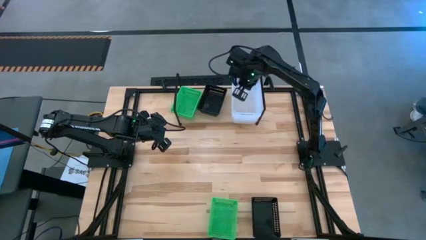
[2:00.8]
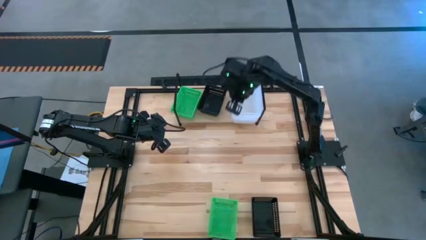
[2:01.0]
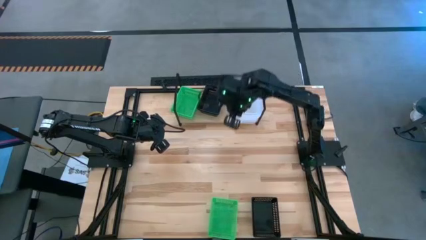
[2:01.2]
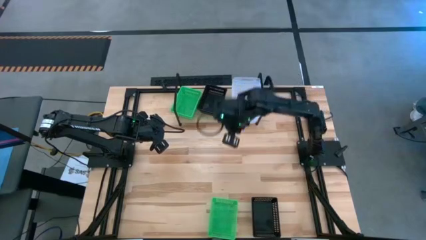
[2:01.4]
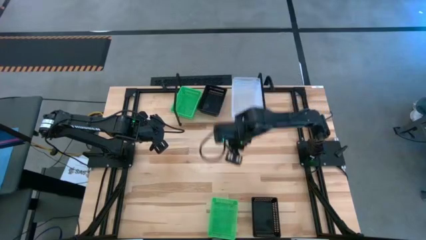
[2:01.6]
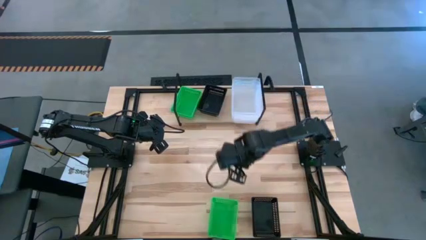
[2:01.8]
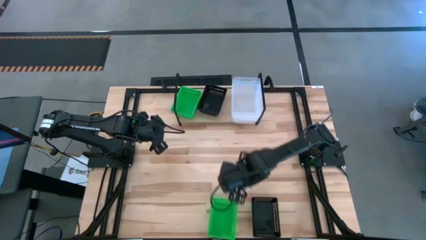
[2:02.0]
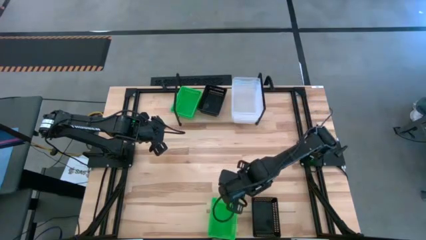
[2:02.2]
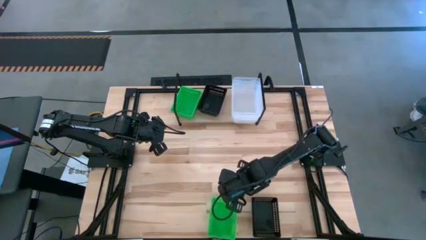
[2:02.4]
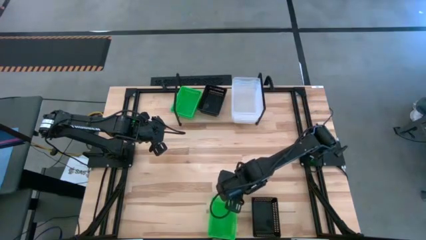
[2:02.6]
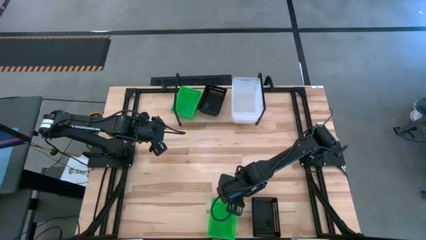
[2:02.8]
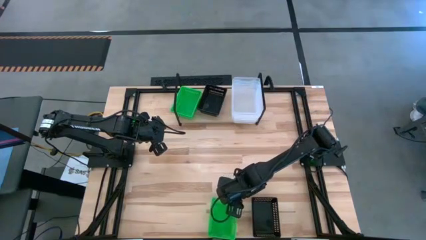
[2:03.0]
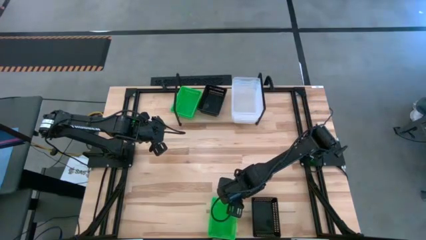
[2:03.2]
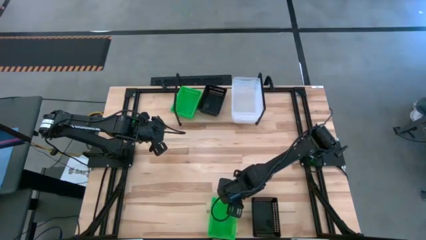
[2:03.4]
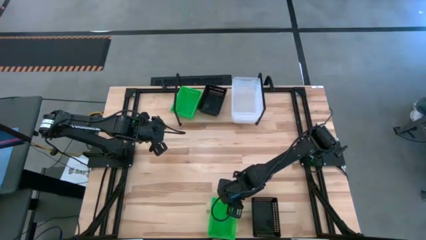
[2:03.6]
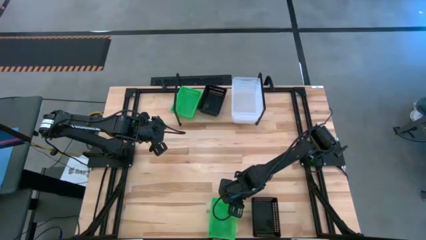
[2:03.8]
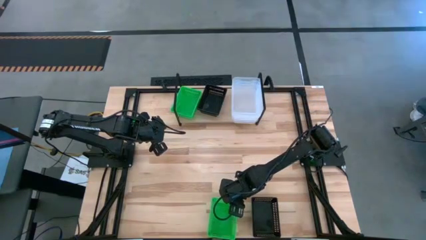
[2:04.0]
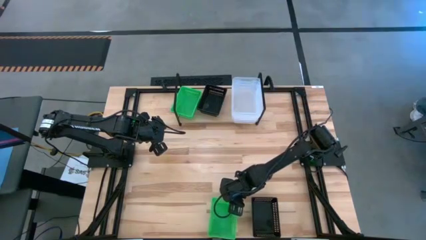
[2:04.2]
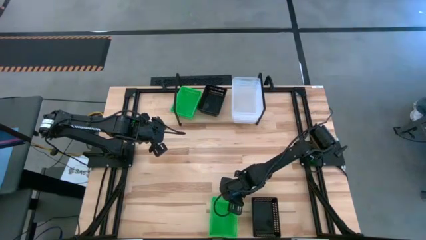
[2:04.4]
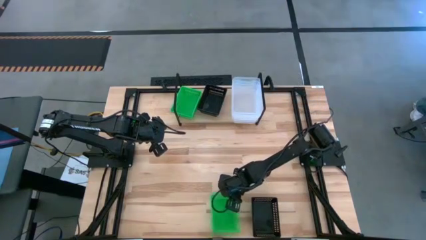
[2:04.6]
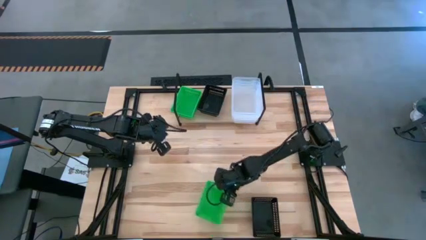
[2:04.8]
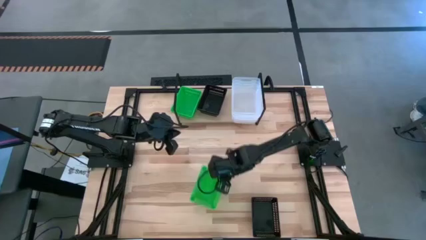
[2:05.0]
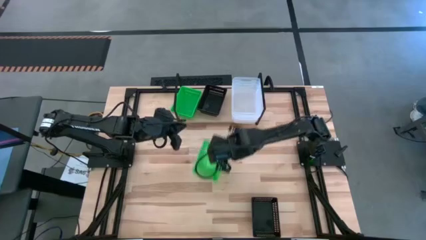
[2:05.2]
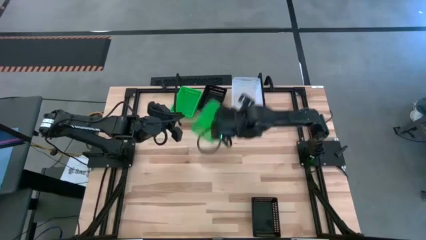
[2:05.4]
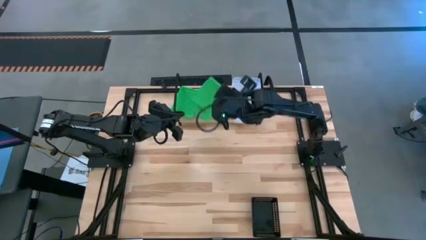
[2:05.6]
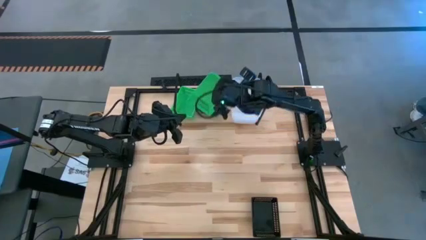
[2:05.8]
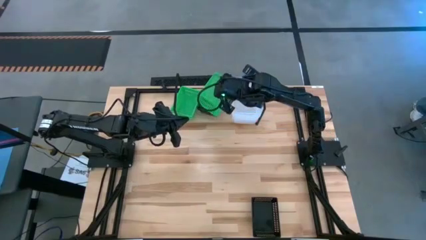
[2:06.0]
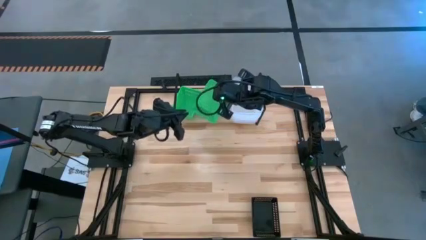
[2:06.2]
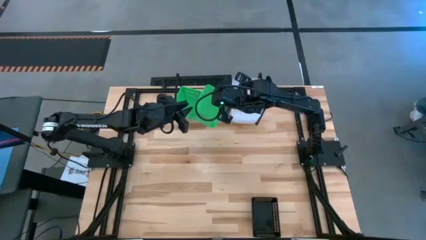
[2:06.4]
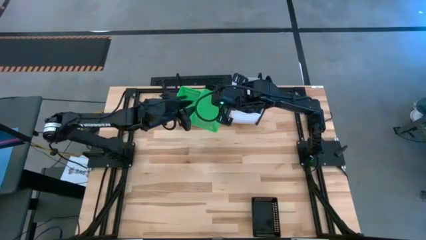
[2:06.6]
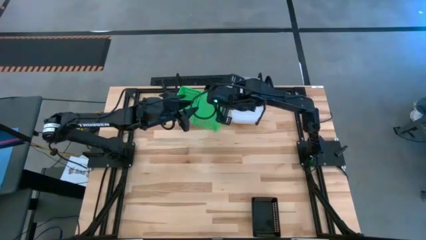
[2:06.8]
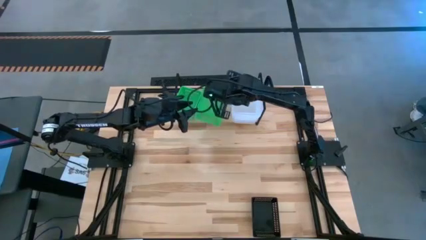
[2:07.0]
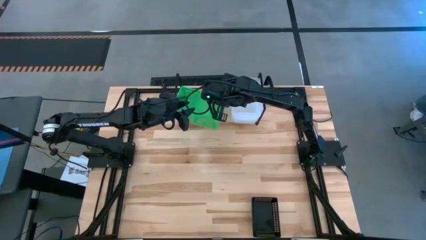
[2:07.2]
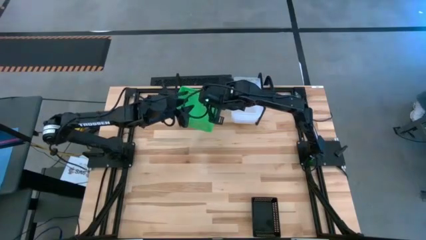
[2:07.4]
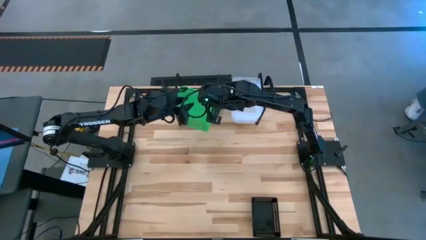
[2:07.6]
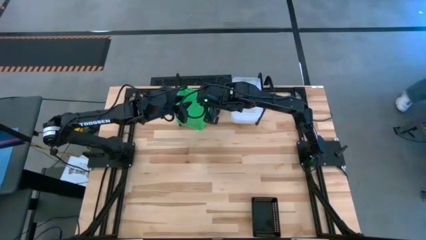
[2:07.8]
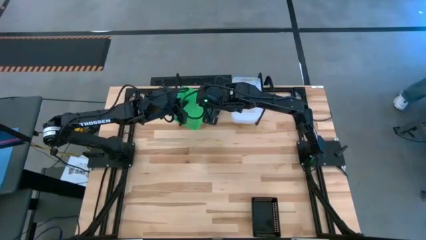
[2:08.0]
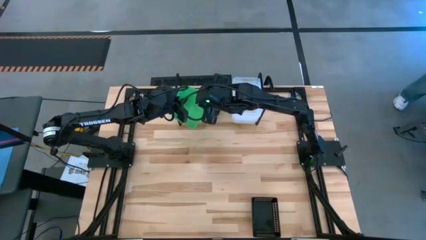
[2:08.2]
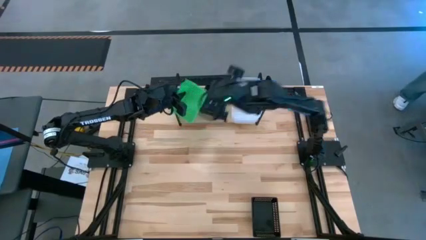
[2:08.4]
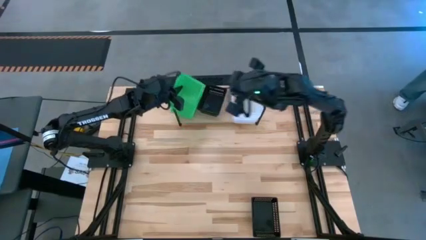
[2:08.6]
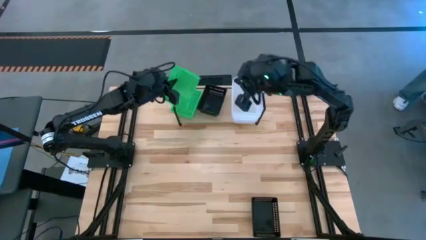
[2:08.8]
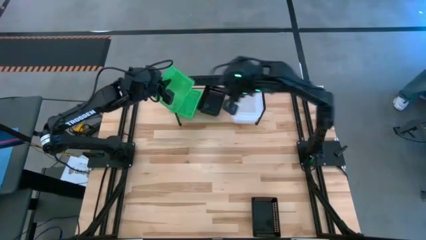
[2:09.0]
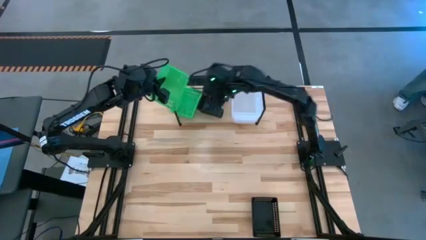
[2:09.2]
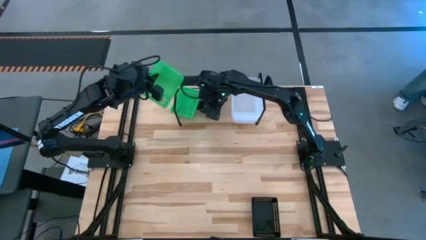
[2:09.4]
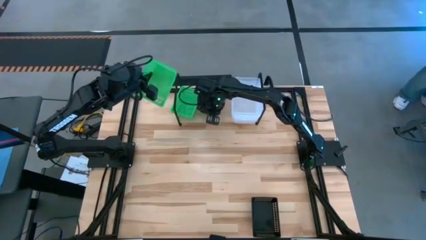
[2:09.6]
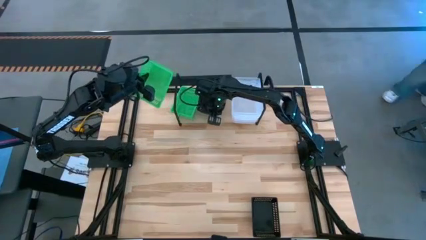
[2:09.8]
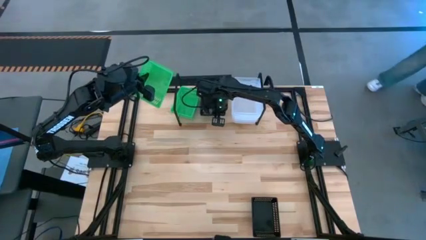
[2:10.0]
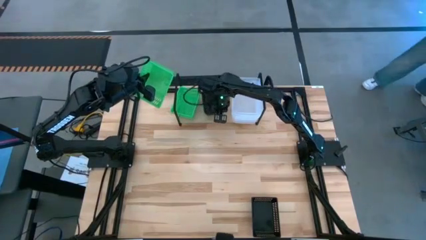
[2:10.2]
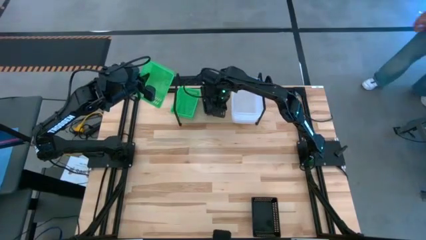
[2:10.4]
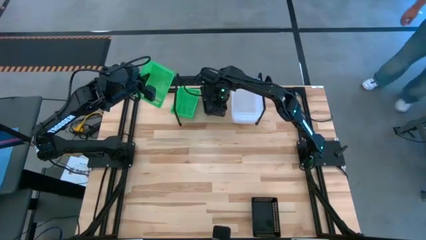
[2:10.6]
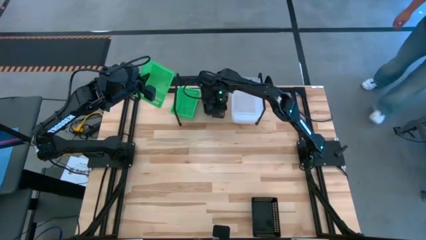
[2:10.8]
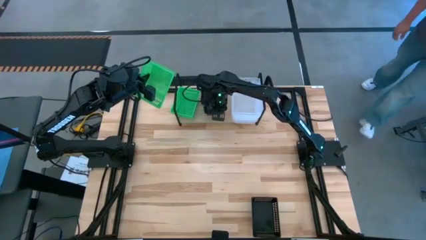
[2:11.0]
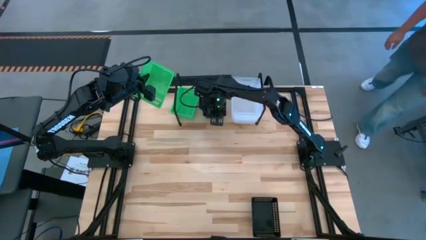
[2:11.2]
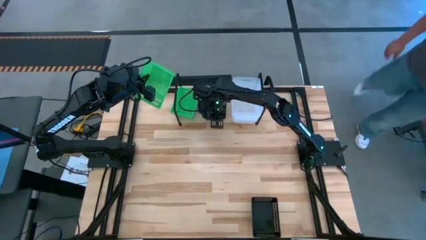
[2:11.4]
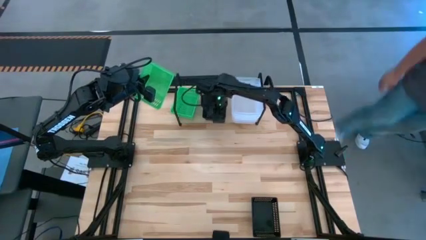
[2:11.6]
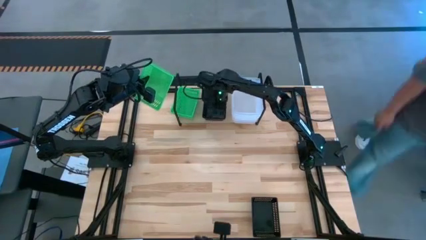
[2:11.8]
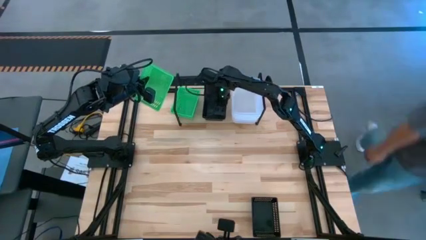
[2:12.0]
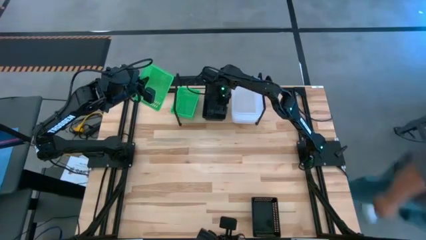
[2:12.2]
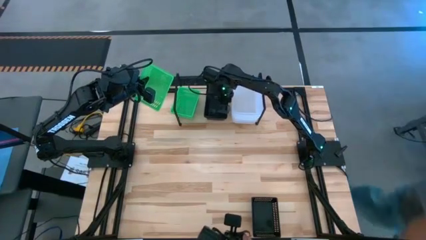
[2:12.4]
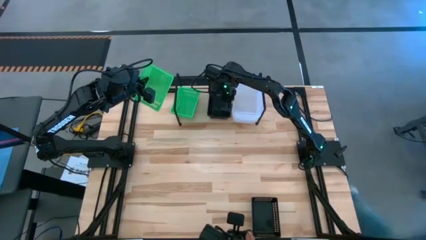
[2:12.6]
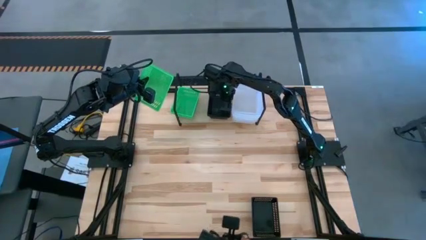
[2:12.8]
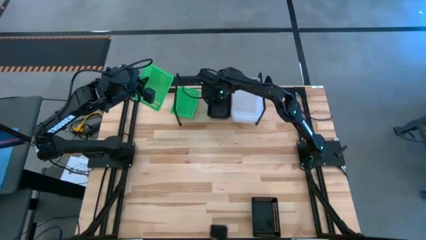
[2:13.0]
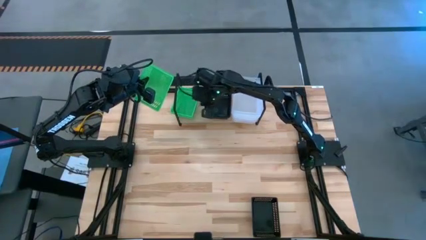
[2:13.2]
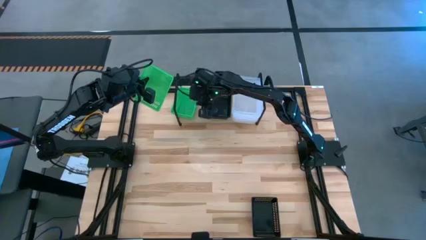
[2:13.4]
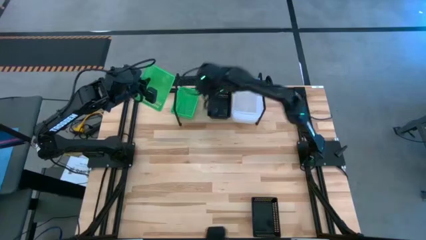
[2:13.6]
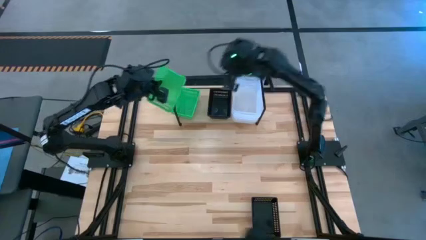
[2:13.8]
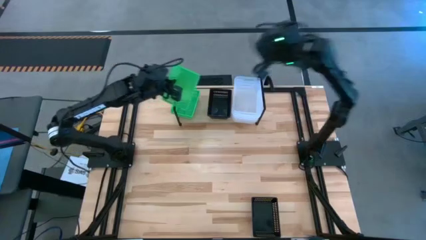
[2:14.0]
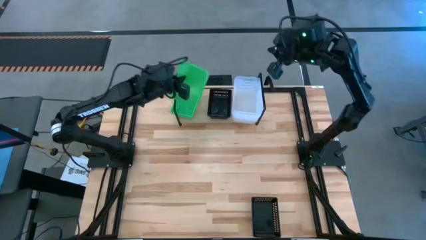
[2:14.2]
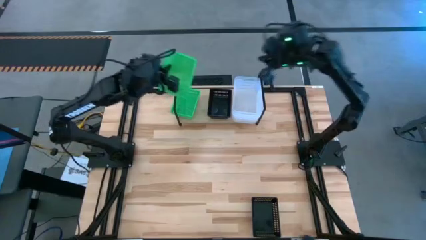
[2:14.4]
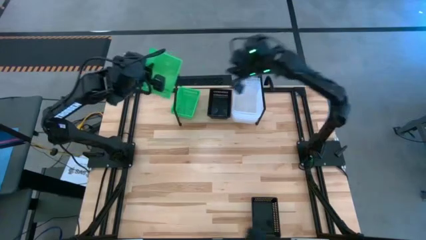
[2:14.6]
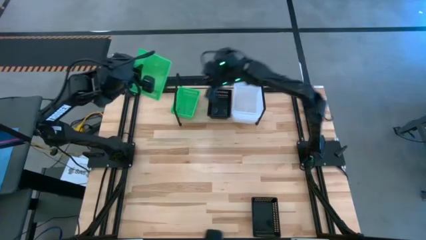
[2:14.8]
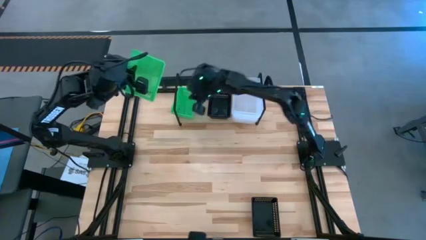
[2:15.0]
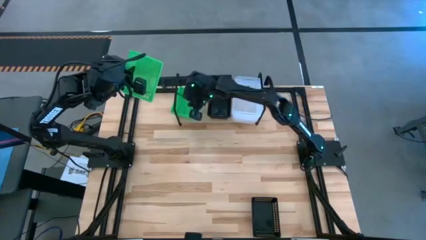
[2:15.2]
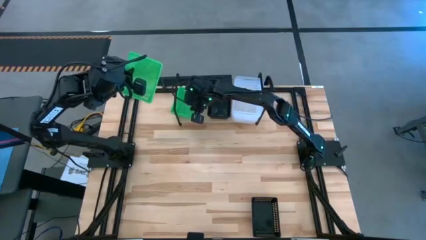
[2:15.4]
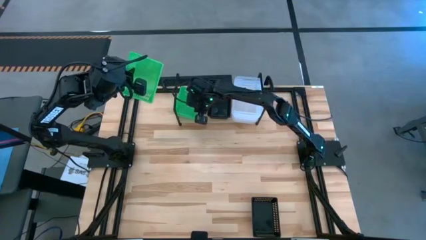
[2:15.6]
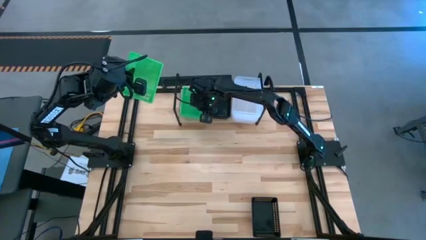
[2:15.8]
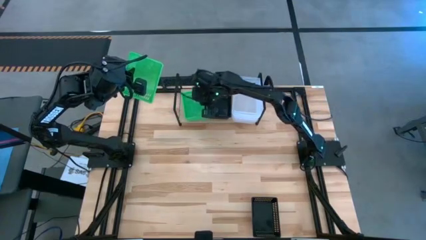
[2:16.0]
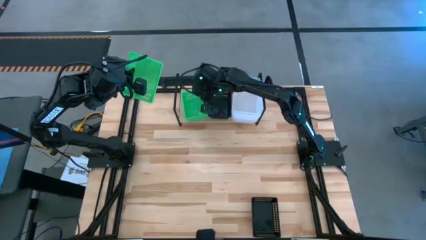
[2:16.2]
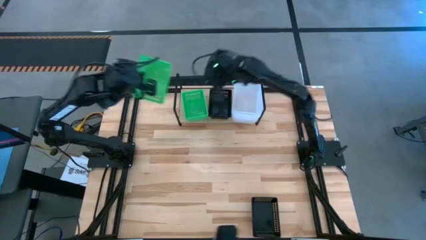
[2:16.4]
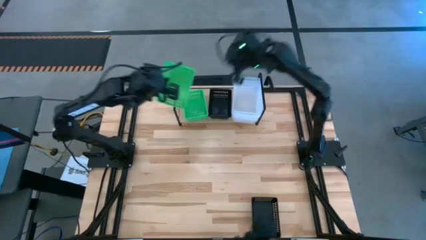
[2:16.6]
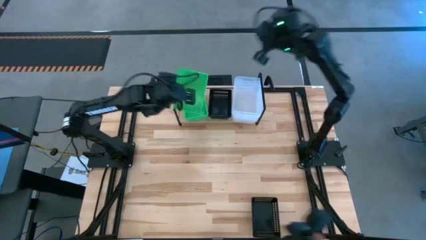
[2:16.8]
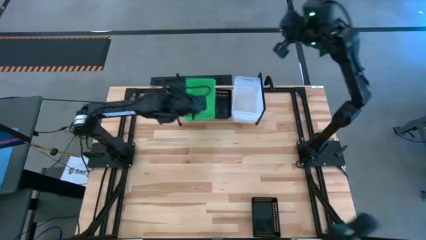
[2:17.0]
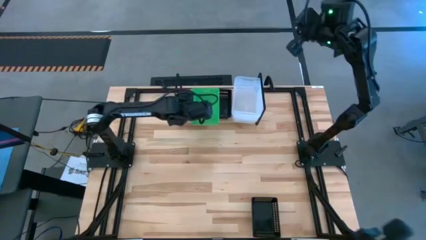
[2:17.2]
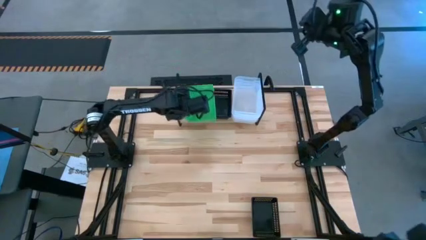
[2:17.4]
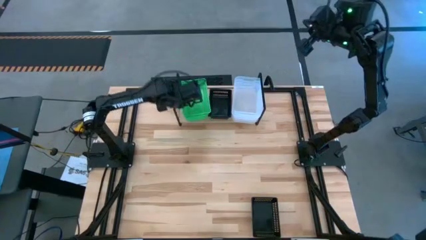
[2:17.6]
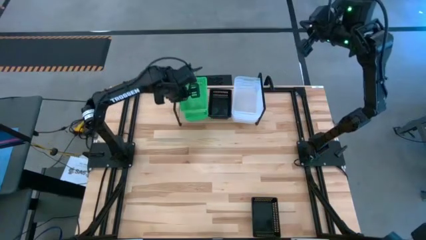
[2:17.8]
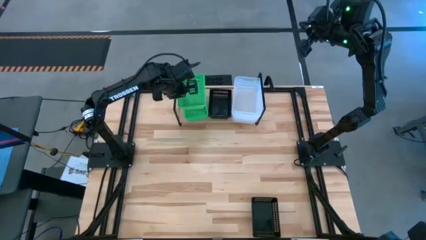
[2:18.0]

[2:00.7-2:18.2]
Task: Stack baskets on shelf by color
Stack the green bin into the green bin on the shelf
